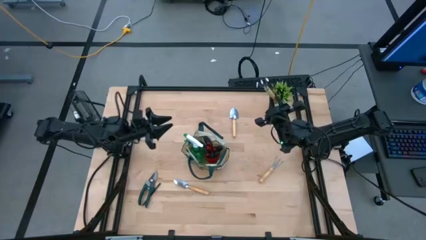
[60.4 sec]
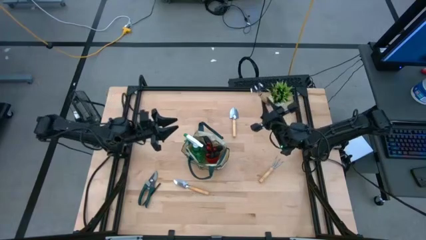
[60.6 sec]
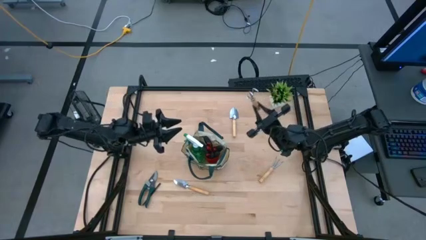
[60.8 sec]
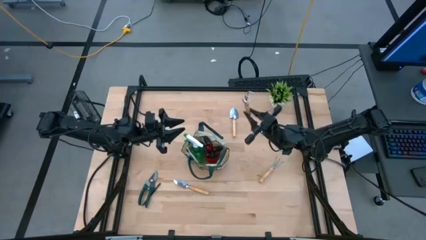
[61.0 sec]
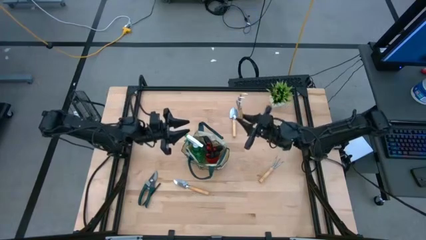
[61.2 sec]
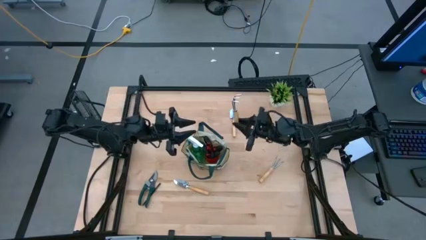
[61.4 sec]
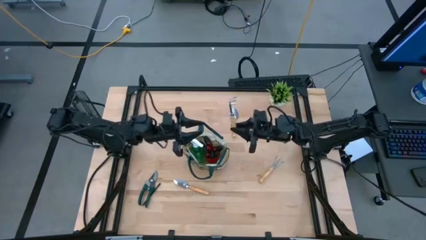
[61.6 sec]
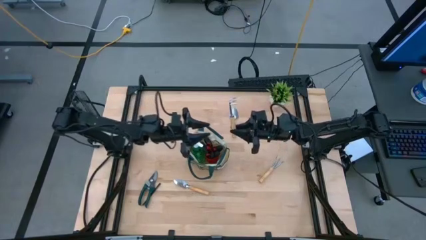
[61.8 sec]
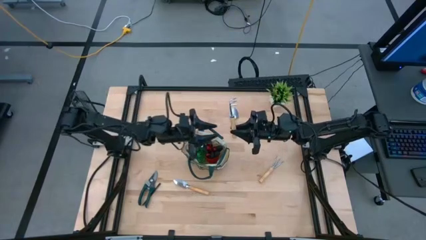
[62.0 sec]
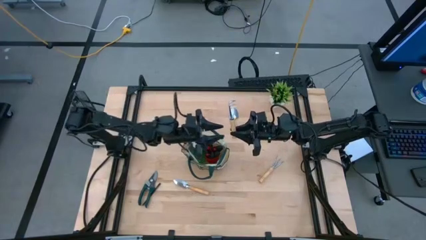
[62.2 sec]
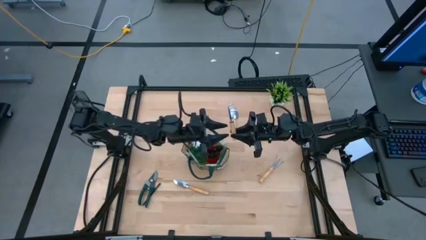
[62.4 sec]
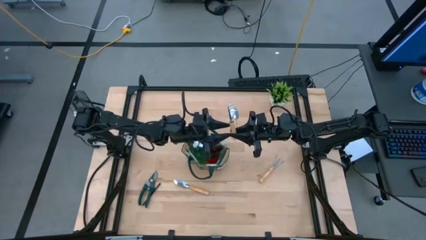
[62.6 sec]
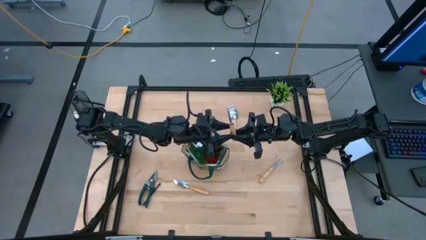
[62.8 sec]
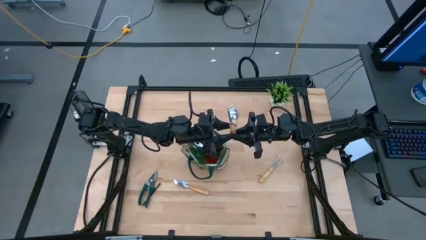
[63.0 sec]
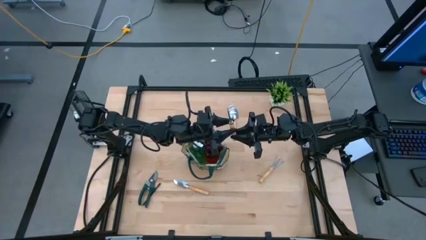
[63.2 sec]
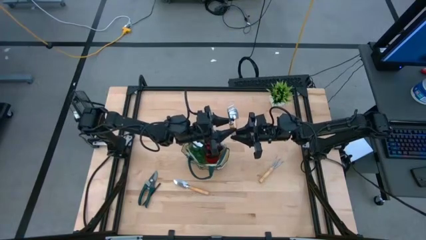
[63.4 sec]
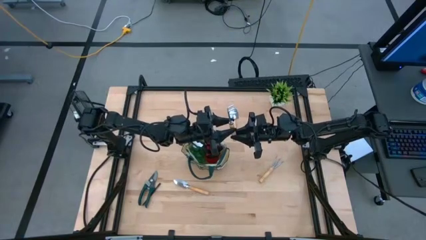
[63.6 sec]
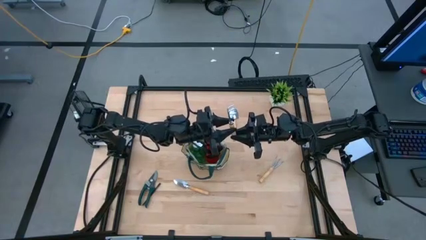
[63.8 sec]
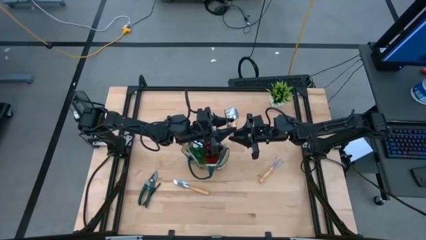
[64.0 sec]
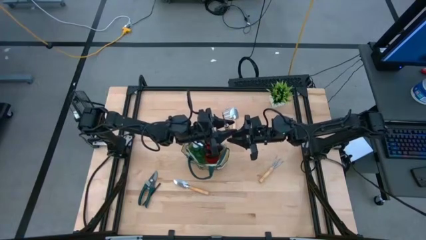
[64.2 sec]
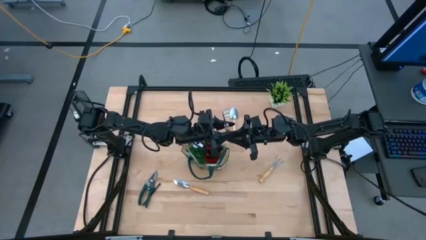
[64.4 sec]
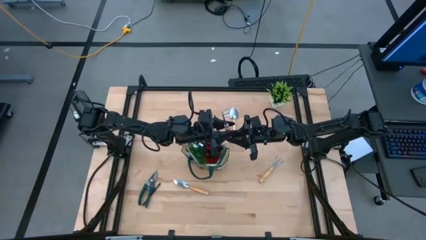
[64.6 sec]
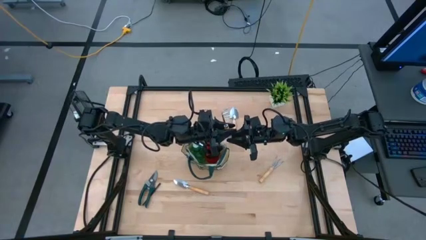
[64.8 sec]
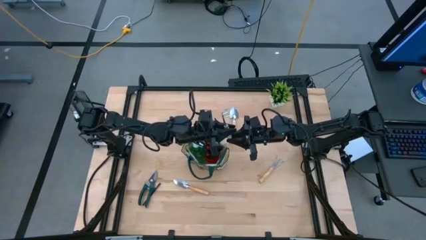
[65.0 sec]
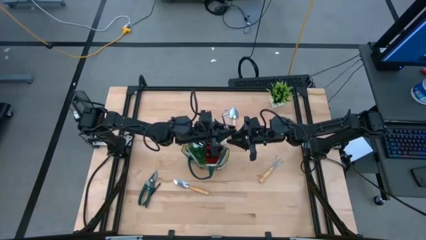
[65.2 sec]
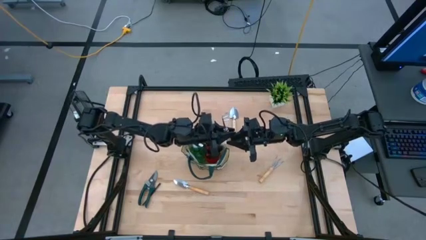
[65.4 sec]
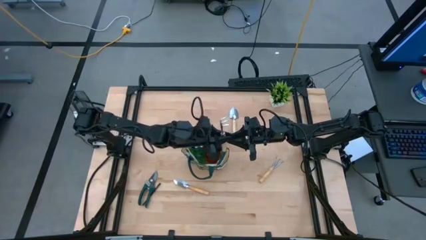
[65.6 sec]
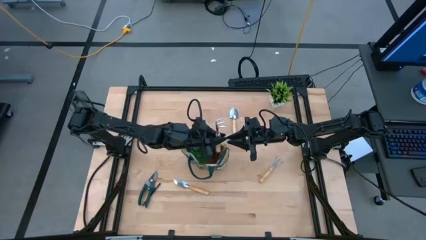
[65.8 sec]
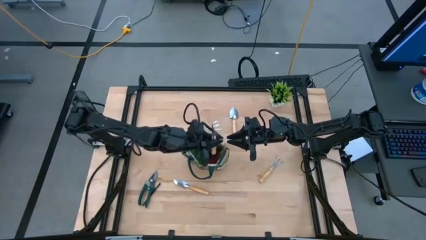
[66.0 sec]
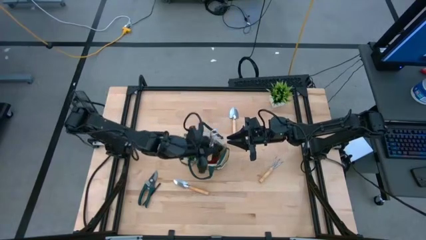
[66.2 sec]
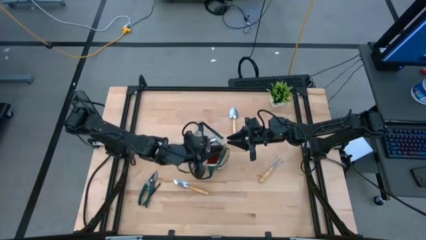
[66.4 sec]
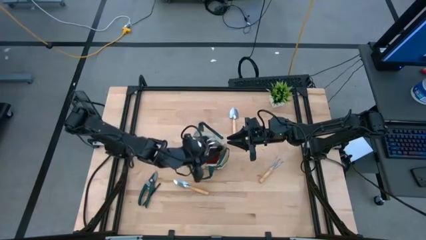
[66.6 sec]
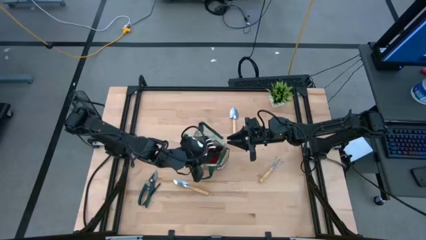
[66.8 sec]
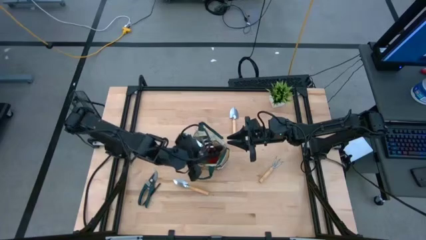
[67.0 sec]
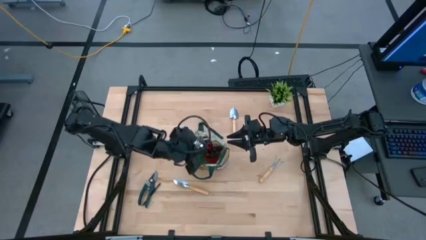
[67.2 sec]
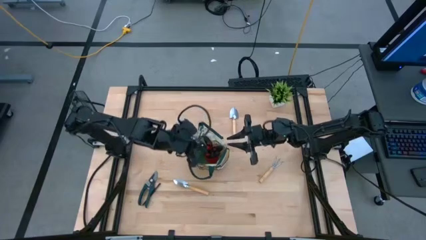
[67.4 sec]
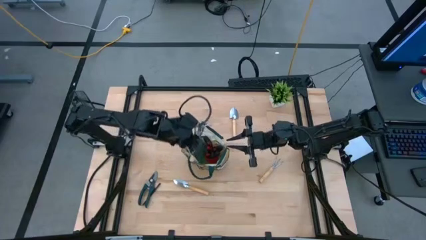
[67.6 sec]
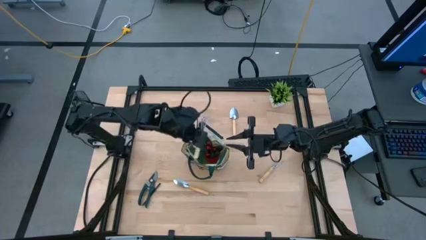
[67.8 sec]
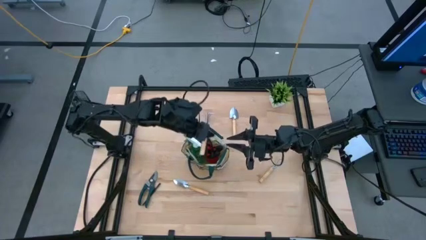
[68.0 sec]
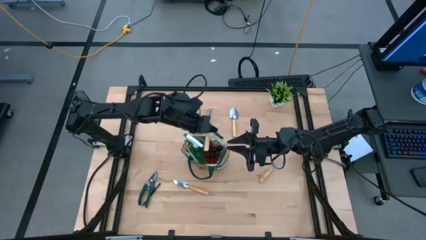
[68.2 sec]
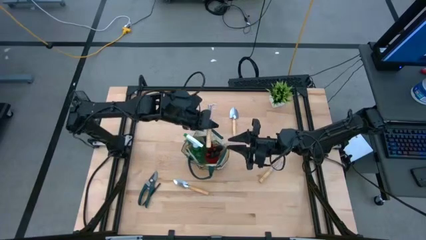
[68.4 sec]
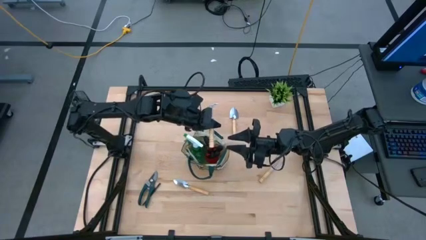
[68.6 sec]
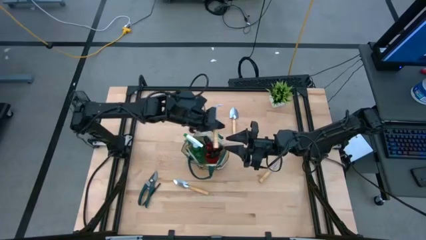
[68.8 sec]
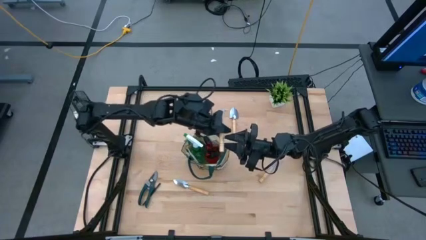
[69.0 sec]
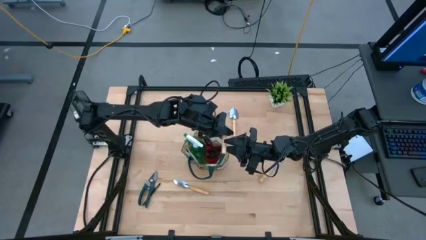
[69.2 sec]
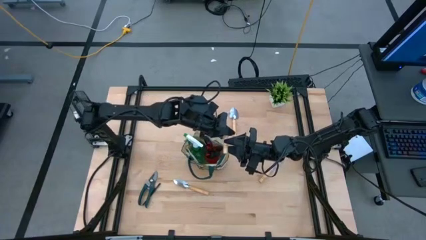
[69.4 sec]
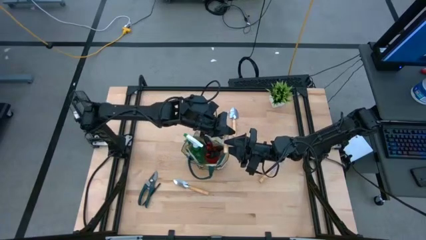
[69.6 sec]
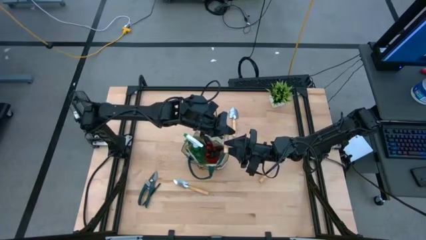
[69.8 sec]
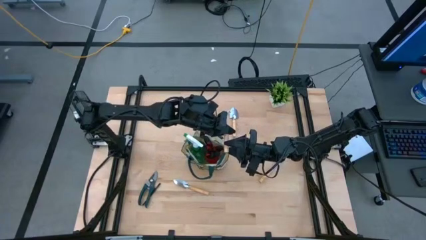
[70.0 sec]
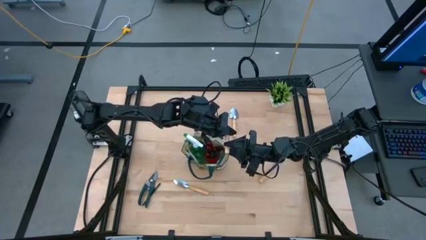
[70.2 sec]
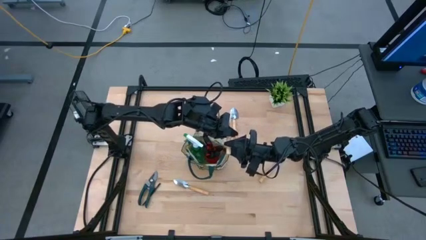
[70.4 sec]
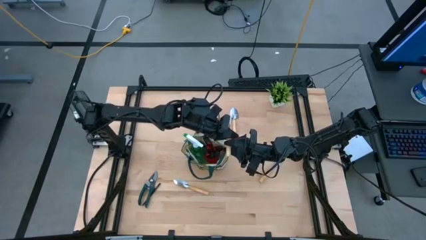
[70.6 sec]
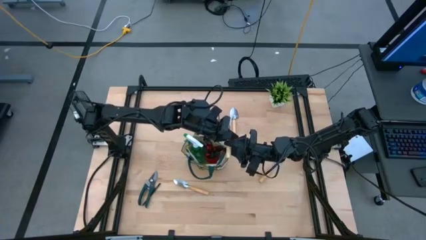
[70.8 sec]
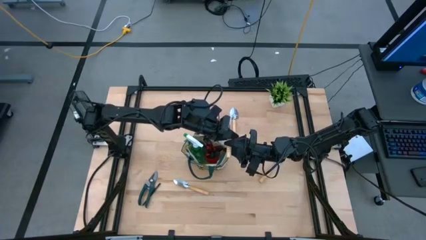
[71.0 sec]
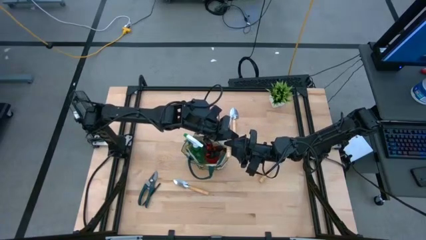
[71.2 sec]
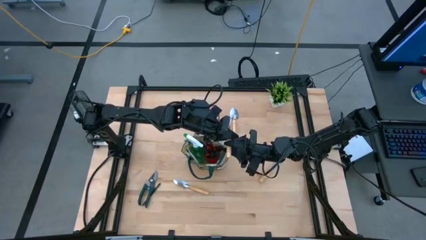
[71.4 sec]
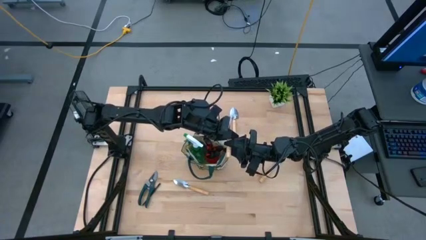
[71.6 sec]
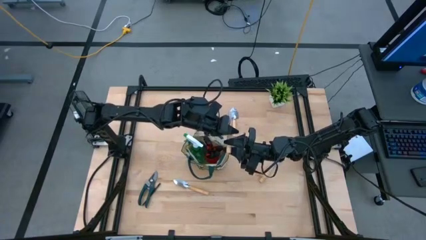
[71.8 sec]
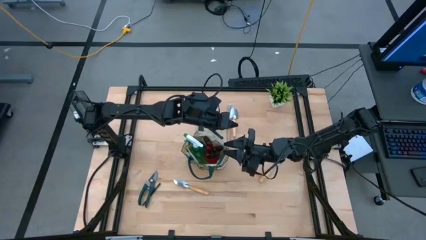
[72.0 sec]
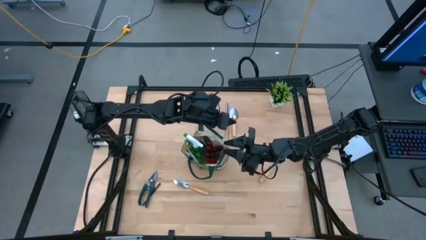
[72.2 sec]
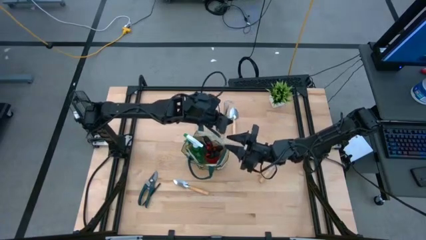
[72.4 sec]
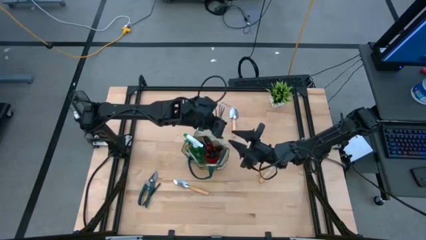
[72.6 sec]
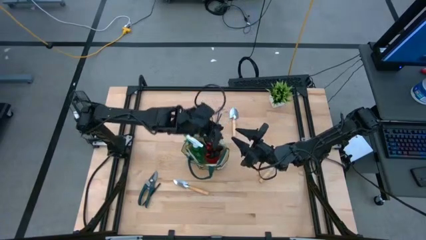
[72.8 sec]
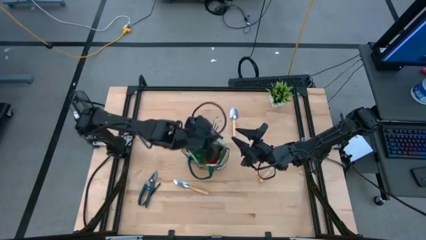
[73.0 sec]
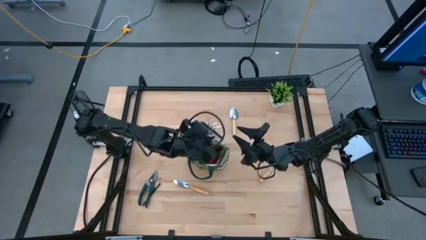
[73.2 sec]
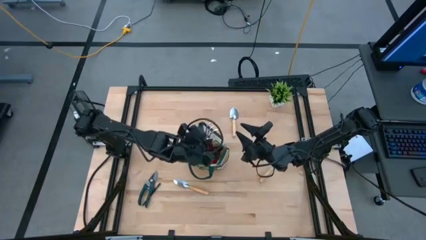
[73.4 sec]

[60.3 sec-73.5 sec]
Task: Pick & Place Garden tools in Gardening bag
Put the brown hand rake into the gardening bag
